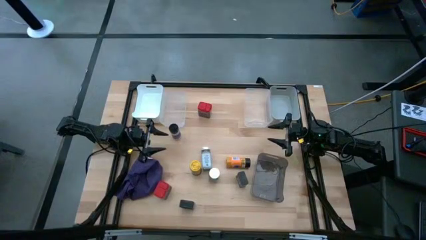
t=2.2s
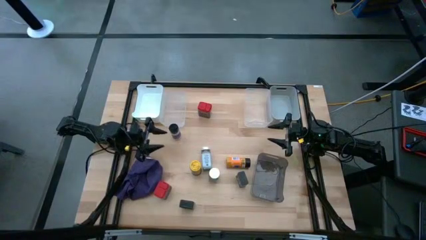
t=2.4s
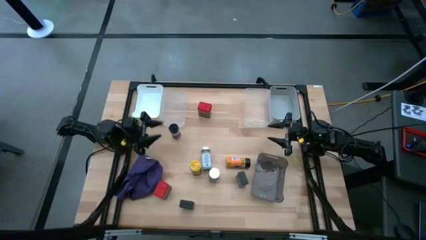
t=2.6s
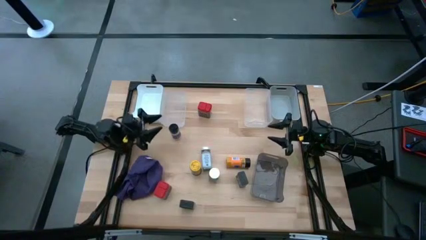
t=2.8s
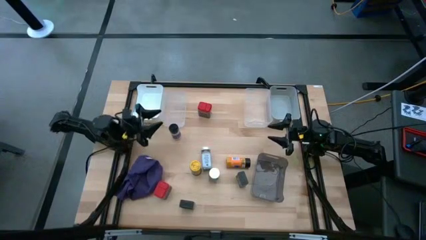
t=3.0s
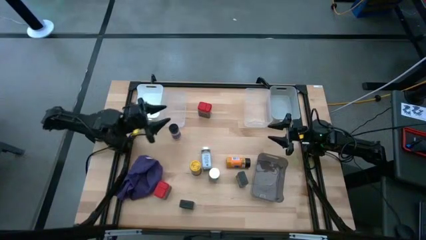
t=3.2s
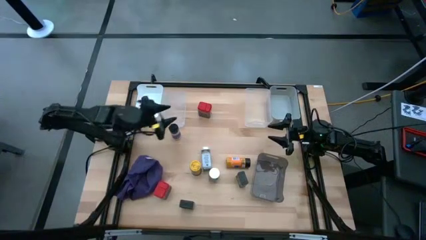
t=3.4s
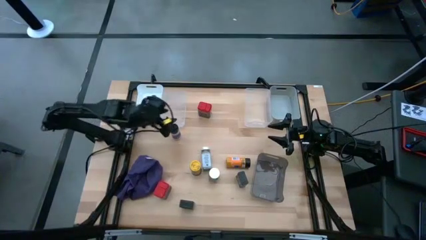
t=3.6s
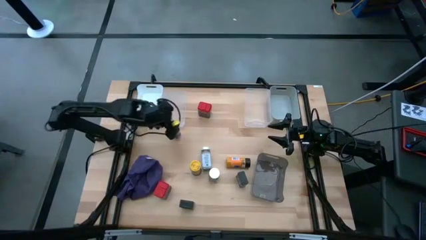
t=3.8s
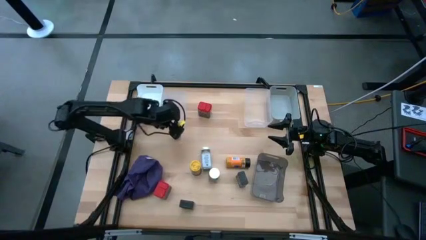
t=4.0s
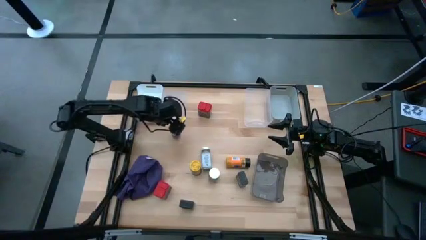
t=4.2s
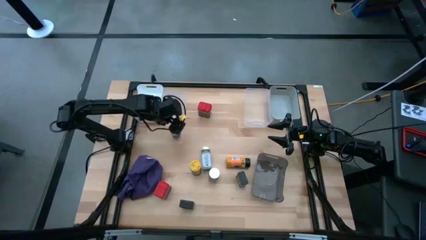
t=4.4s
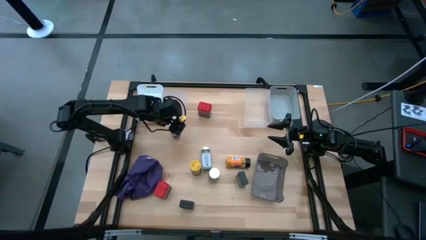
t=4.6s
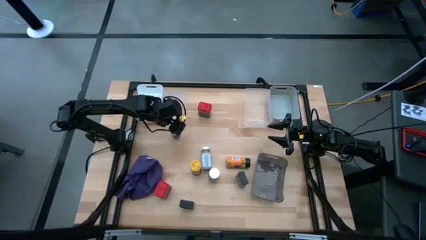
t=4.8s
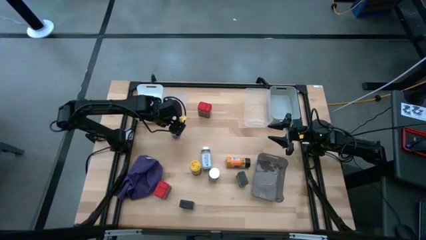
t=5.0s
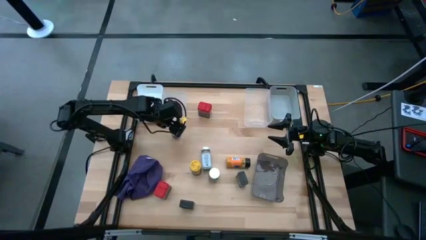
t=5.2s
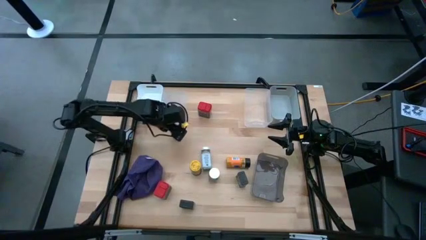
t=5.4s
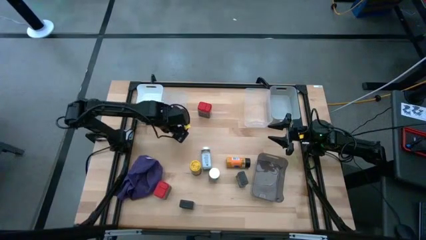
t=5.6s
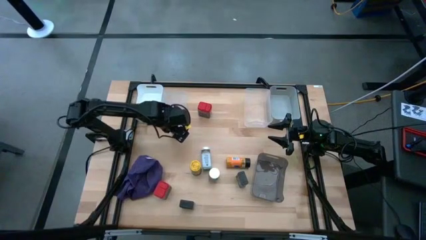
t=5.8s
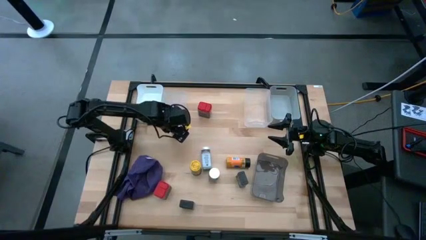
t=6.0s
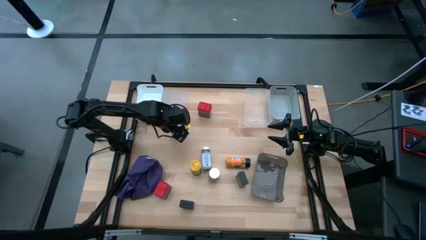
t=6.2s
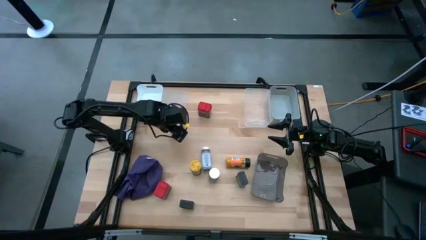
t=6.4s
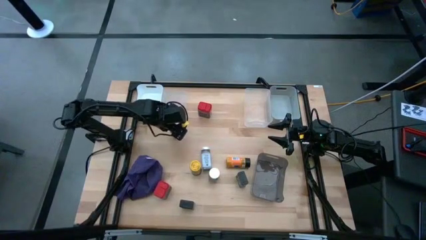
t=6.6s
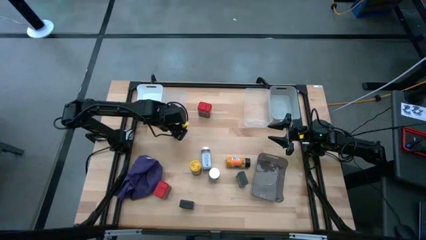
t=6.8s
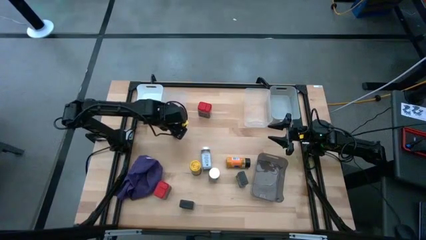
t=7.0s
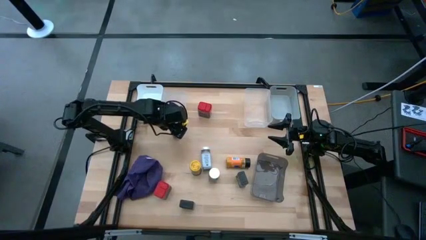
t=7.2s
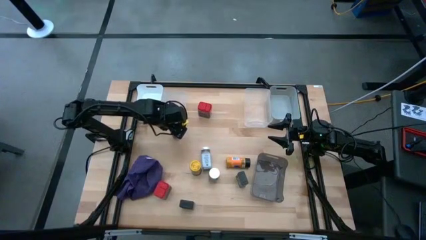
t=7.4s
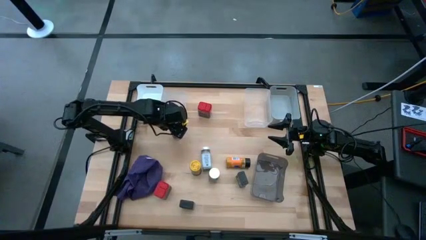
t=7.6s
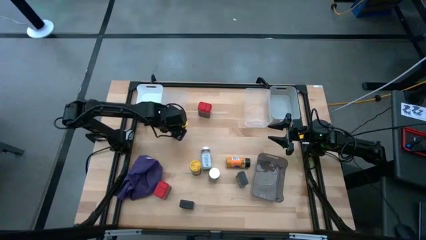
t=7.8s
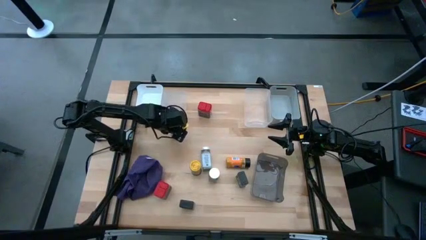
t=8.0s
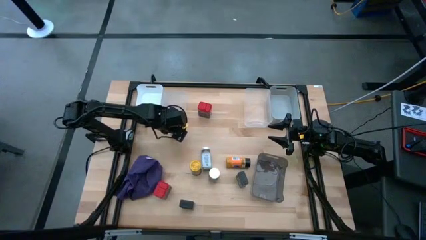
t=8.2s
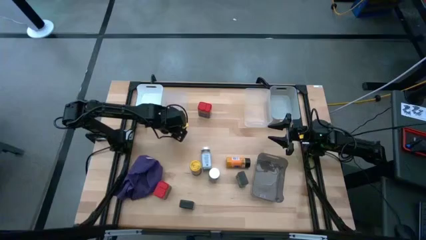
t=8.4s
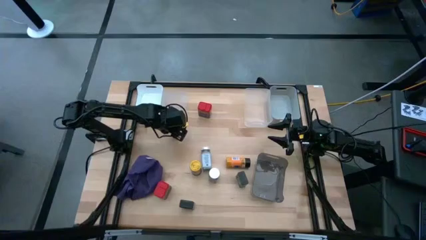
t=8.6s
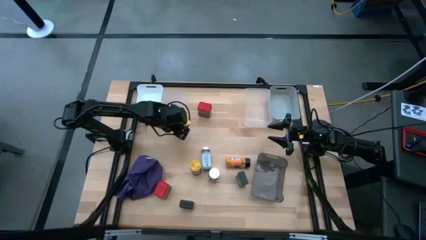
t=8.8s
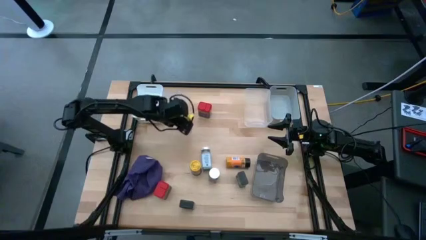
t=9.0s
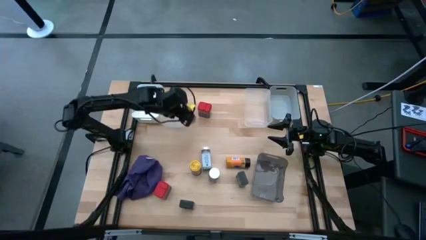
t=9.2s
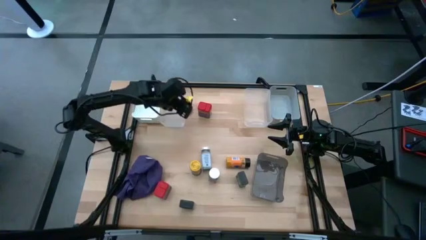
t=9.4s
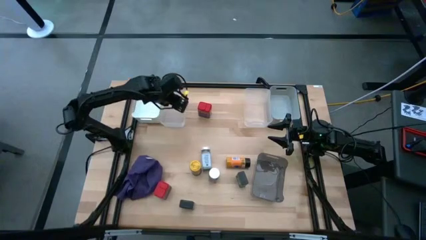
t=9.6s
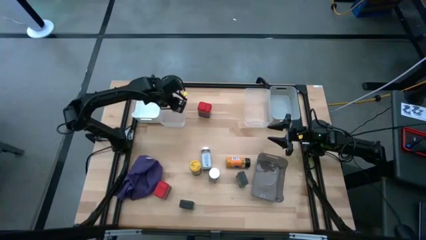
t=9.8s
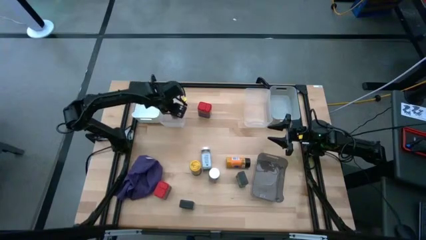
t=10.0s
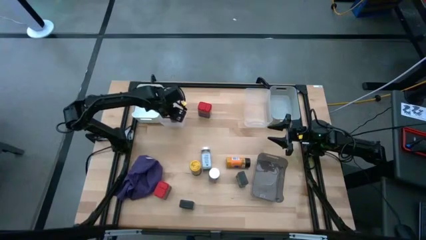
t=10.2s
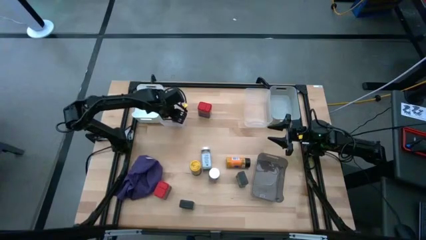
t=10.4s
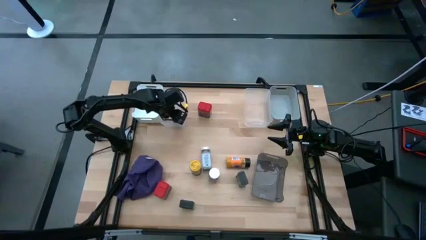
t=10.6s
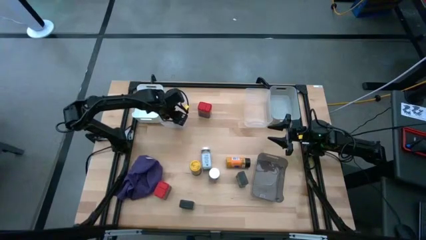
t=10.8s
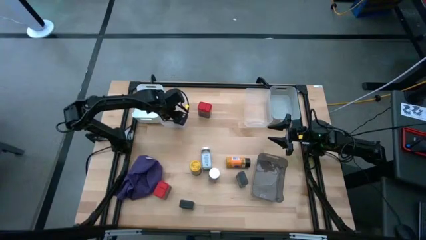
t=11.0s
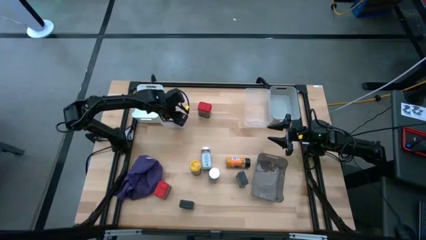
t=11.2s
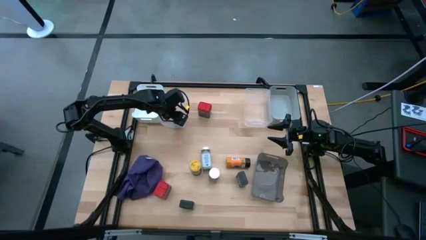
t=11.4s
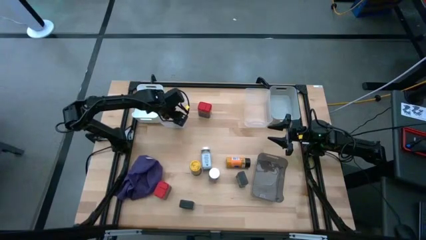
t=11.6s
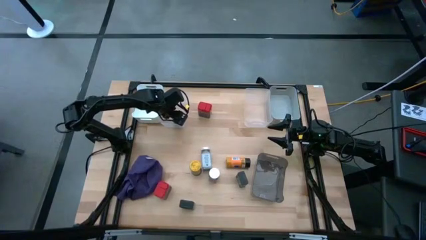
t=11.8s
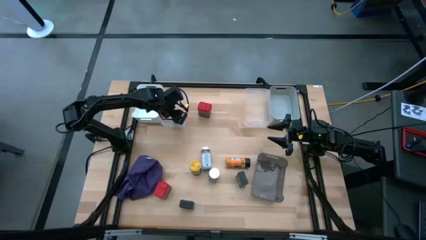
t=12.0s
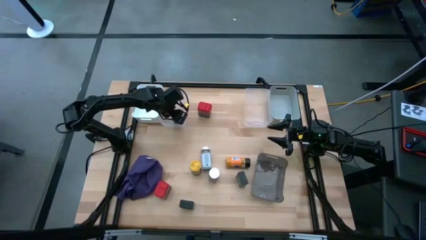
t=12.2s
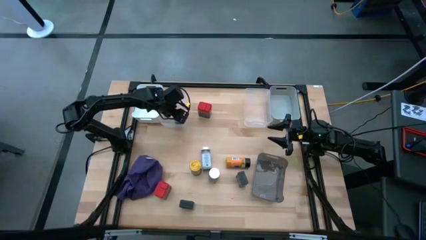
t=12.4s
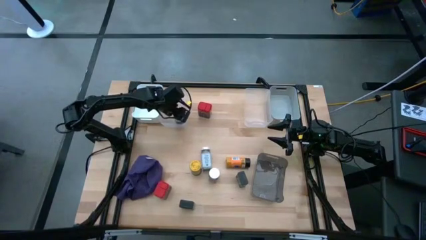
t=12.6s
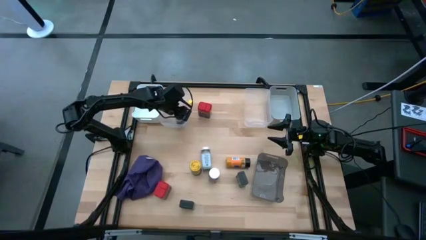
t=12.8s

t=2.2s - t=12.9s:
Task: Sort spices by type
Put the left black seasoning bottle into the left transparent bin

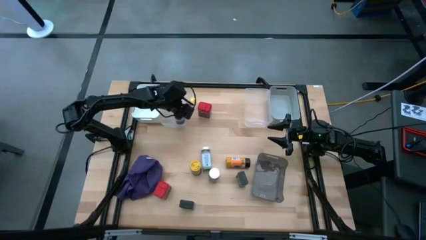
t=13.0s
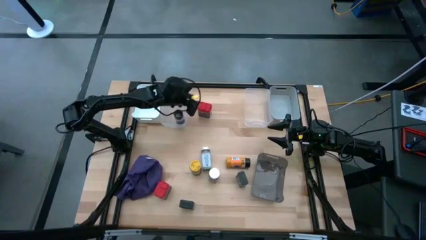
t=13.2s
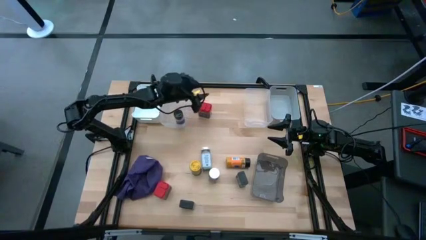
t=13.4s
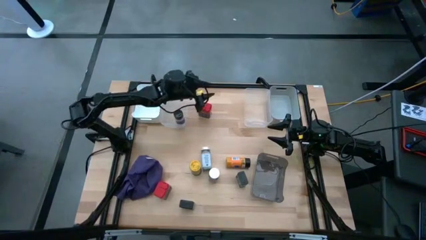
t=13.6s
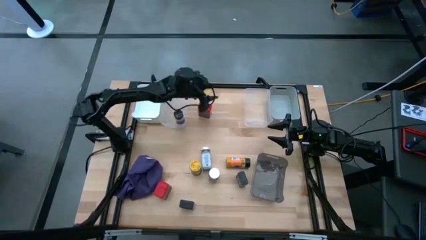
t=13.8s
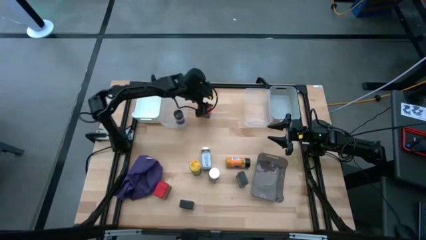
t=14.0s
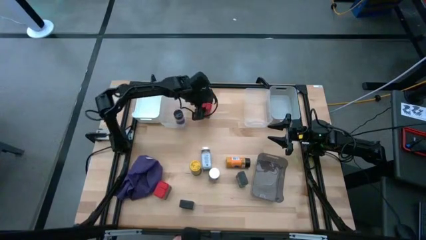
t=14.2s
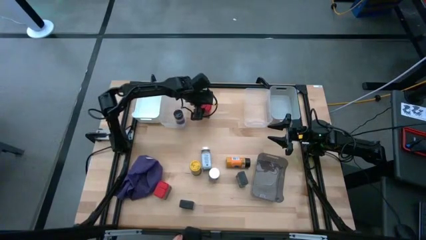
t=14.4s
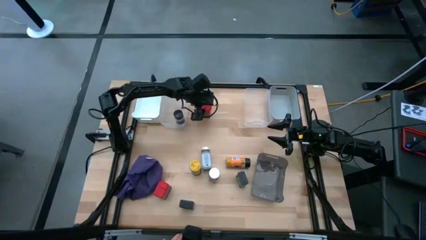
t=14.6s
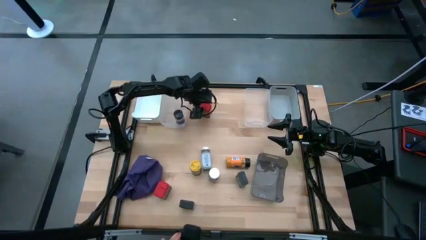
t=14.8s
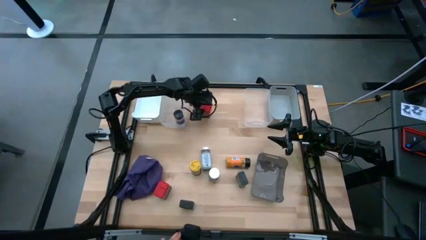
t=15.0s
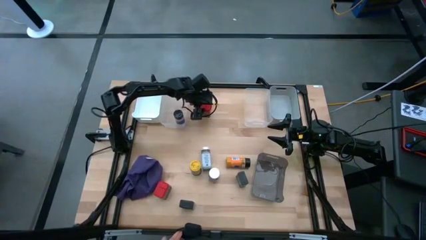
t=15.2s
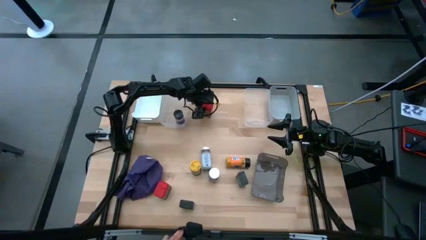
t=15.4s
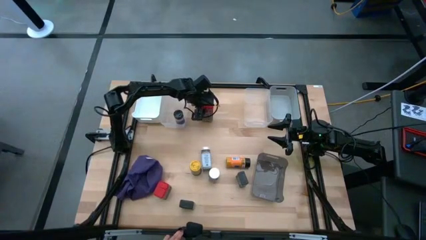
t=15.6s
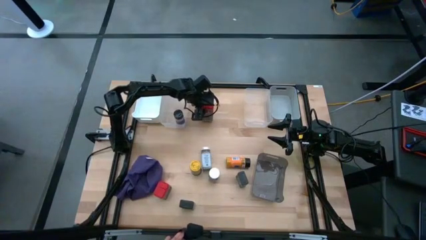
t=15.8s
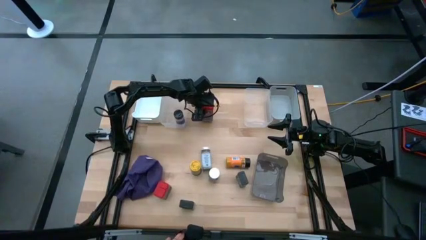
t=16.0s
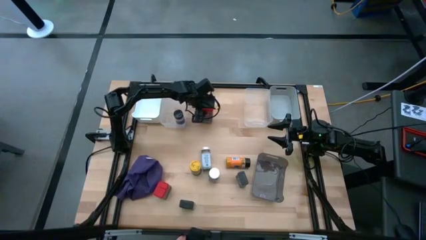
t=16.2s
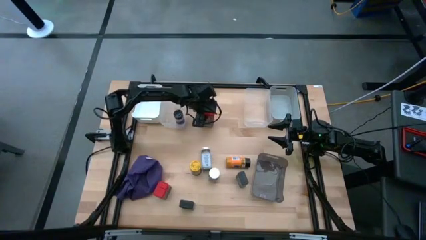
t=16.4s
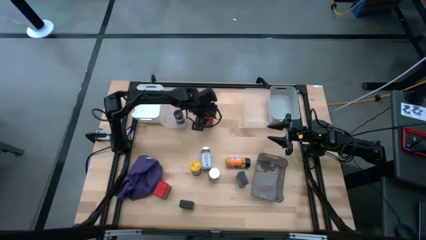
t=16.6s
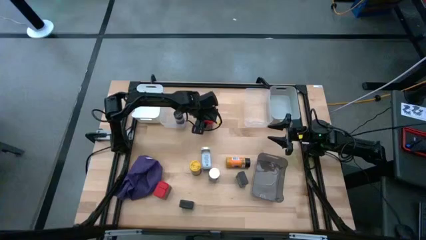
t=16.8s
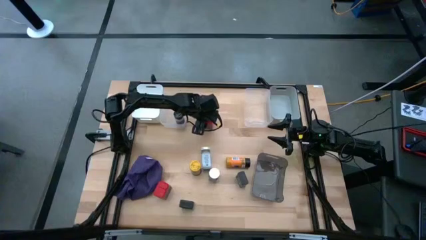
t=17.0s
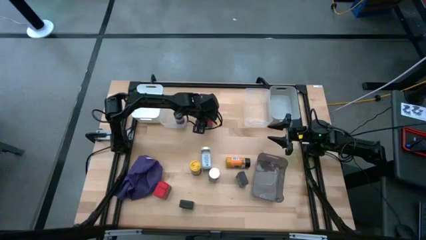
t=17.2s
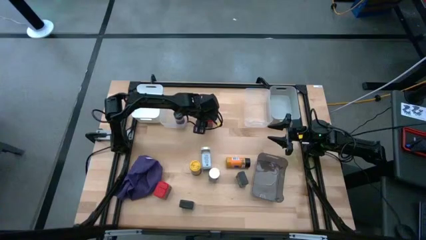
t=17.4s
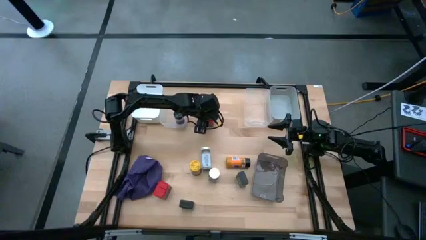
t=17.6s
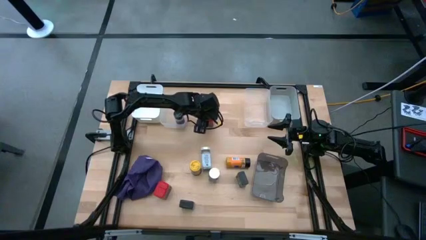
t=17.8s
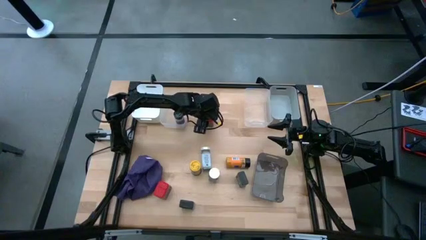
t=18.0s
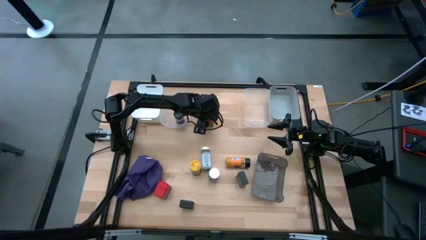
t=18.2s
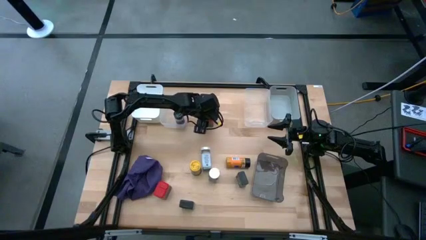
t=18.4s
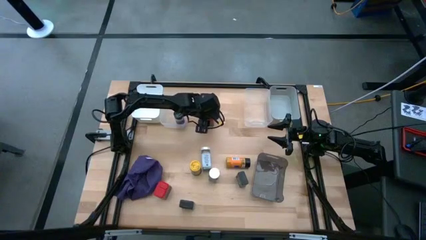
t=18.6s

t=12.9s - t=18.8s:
Put the top red seasoning can into the white bin
